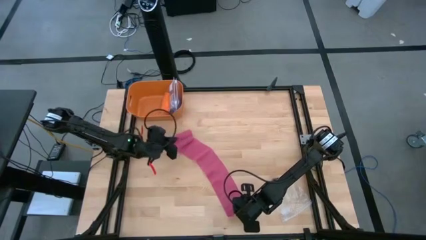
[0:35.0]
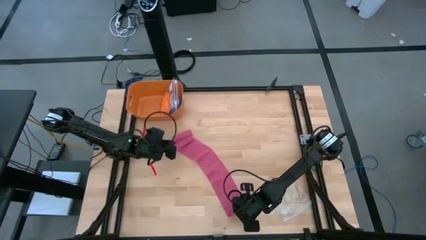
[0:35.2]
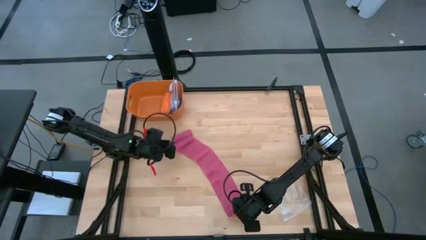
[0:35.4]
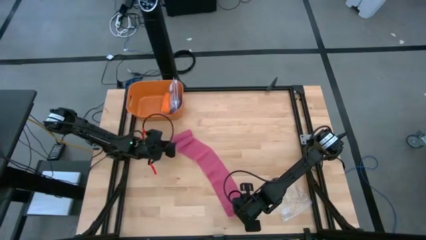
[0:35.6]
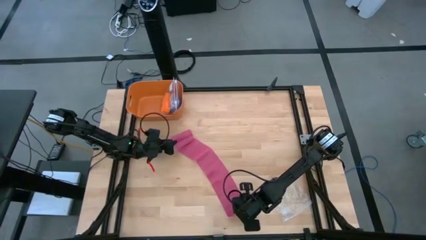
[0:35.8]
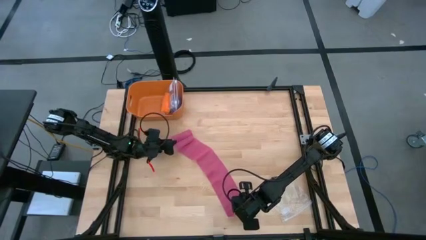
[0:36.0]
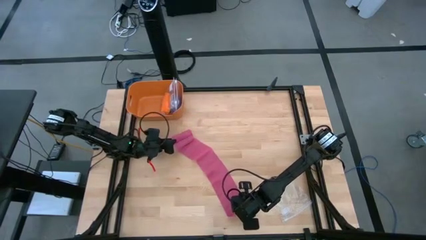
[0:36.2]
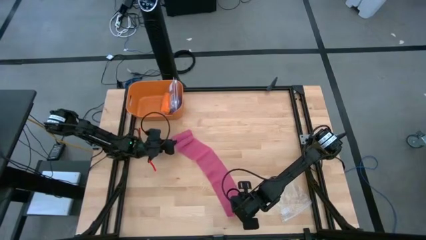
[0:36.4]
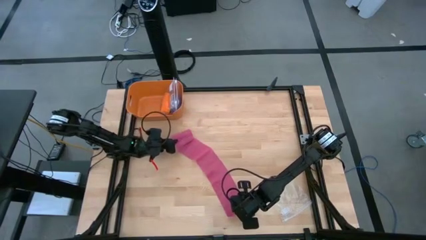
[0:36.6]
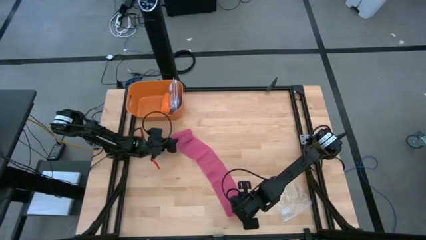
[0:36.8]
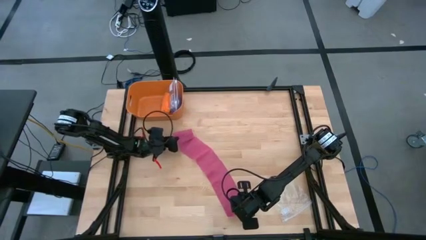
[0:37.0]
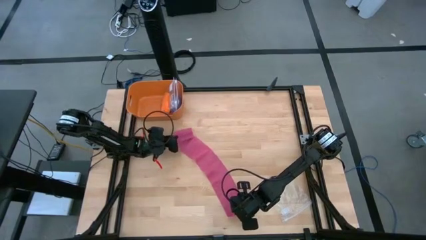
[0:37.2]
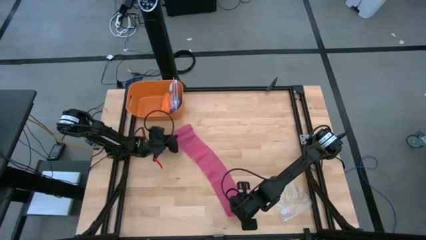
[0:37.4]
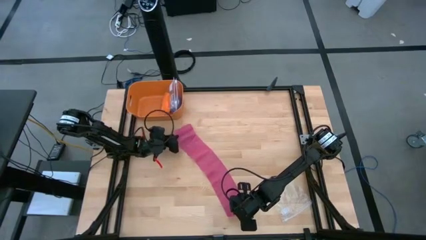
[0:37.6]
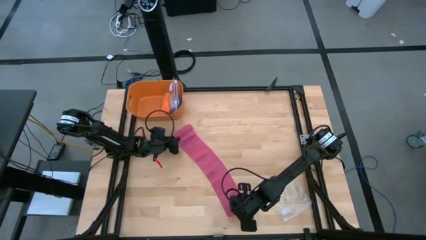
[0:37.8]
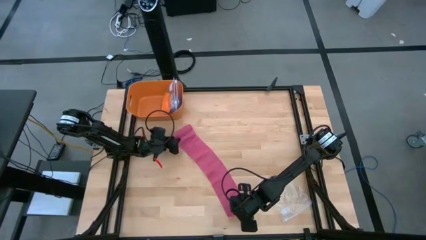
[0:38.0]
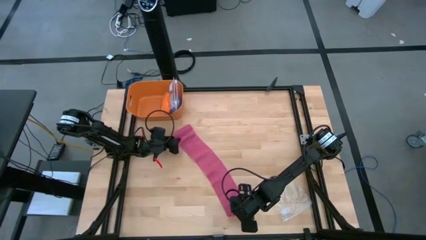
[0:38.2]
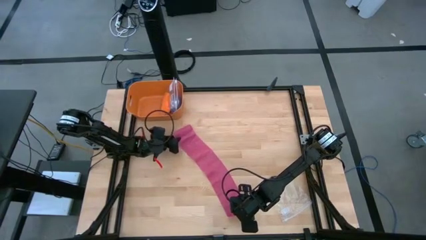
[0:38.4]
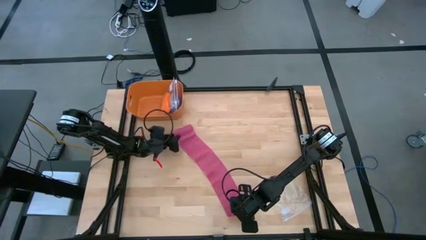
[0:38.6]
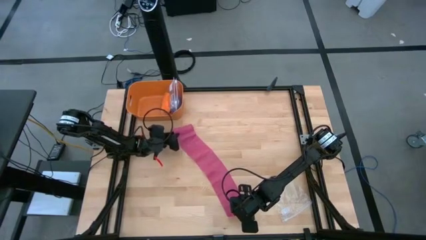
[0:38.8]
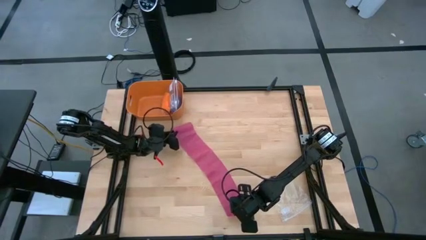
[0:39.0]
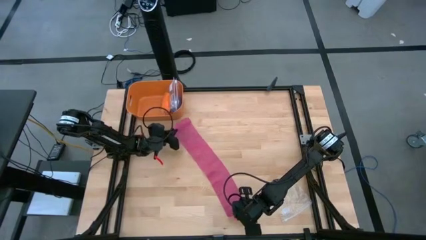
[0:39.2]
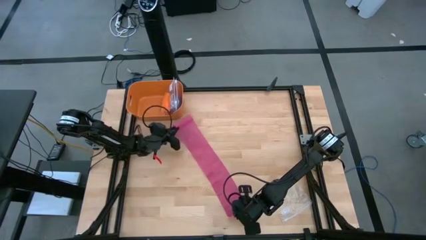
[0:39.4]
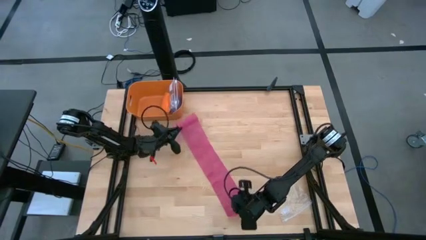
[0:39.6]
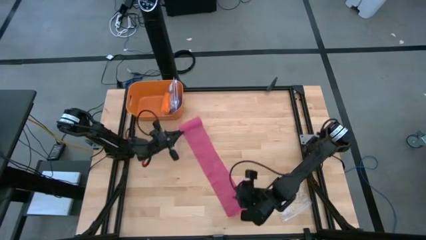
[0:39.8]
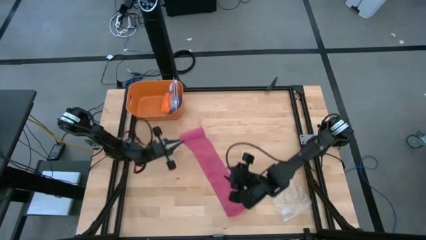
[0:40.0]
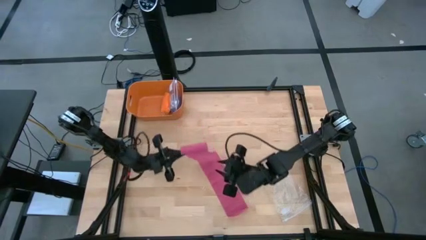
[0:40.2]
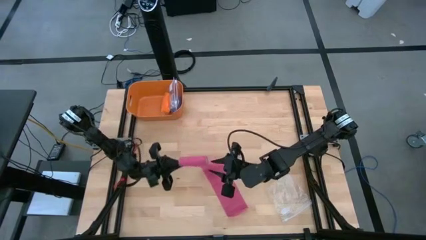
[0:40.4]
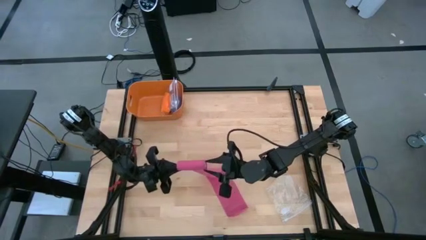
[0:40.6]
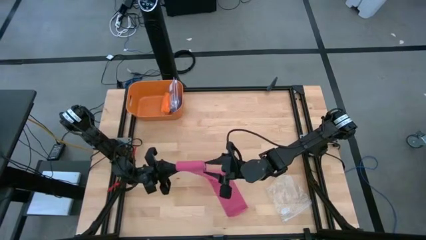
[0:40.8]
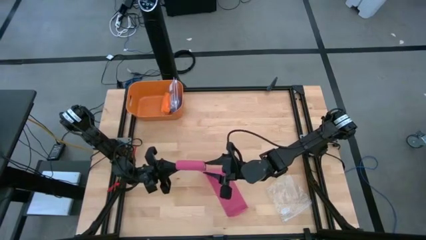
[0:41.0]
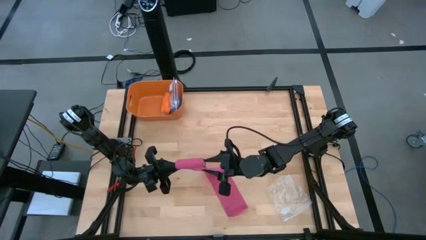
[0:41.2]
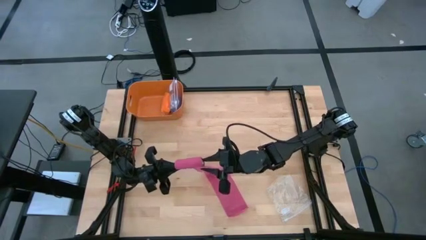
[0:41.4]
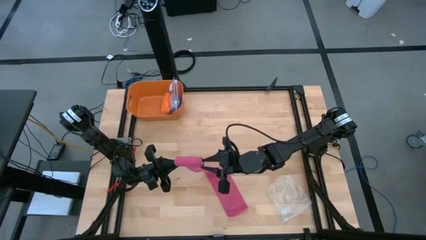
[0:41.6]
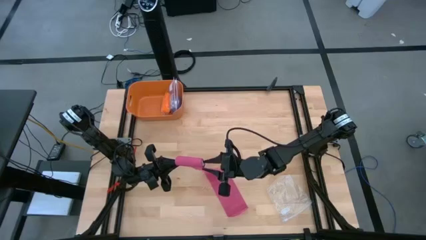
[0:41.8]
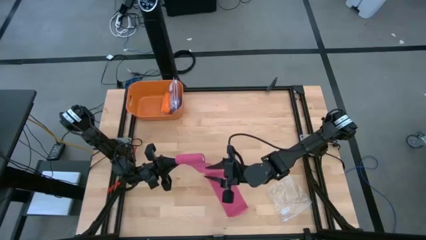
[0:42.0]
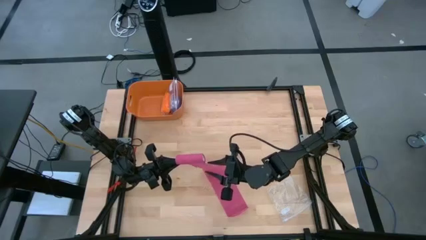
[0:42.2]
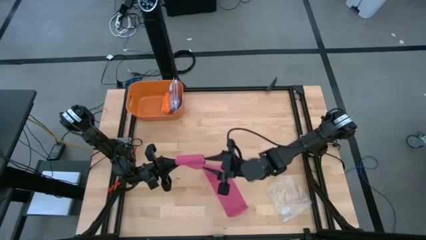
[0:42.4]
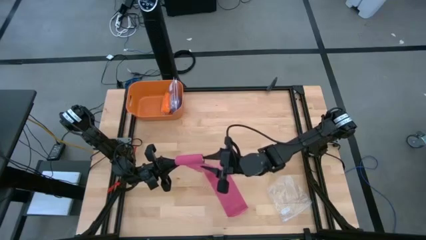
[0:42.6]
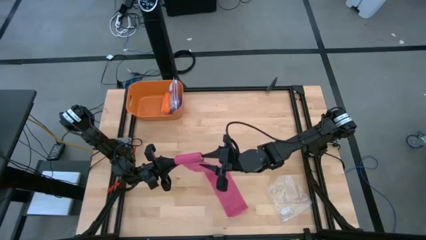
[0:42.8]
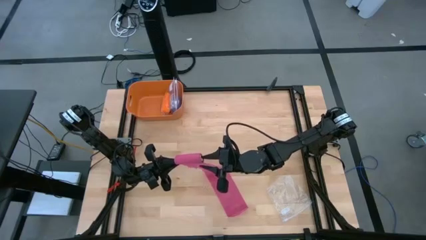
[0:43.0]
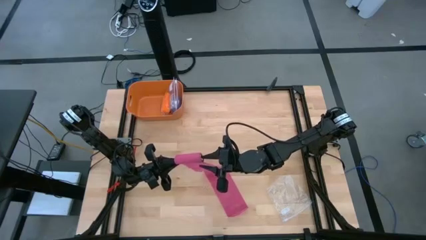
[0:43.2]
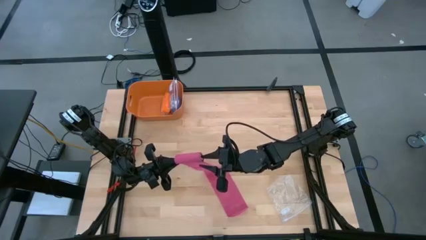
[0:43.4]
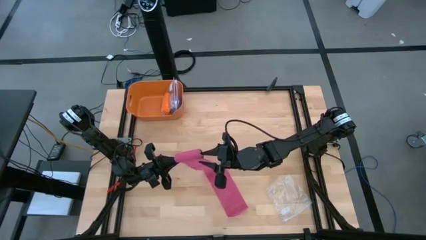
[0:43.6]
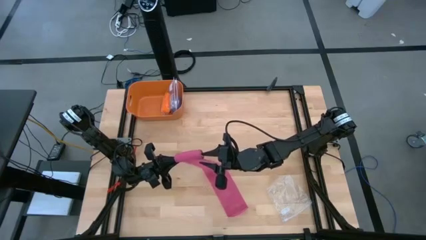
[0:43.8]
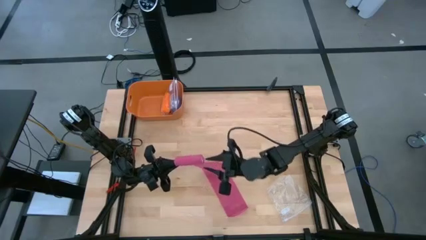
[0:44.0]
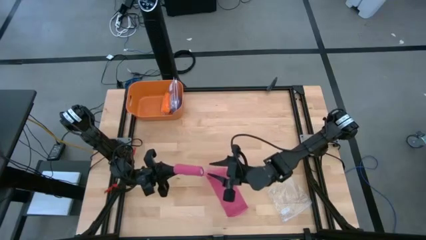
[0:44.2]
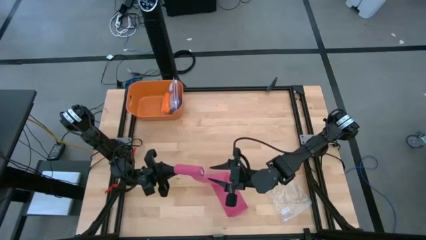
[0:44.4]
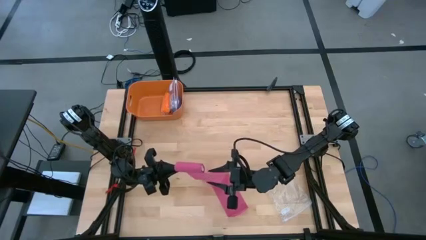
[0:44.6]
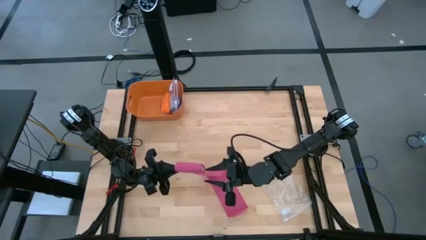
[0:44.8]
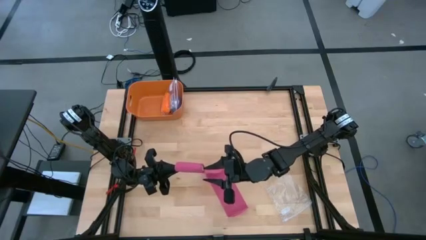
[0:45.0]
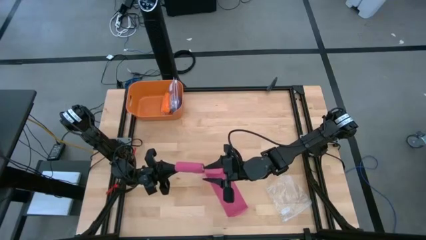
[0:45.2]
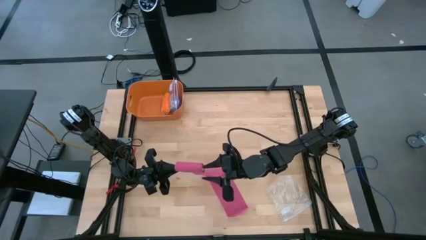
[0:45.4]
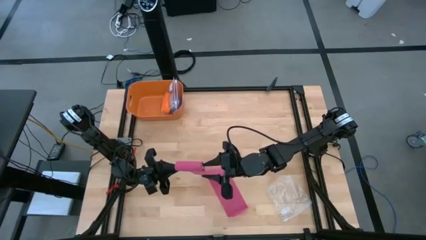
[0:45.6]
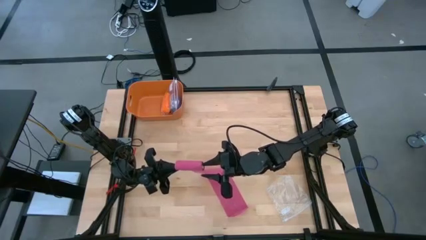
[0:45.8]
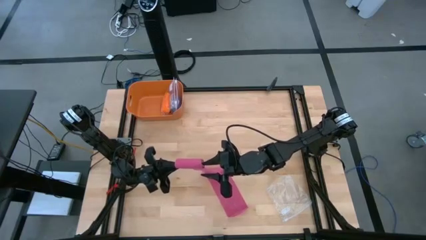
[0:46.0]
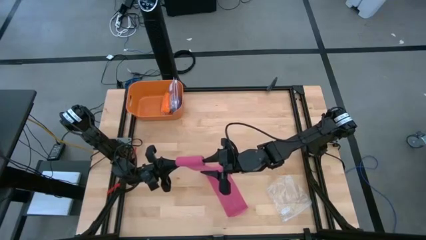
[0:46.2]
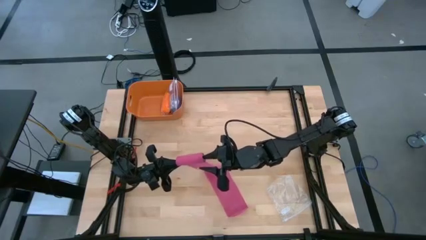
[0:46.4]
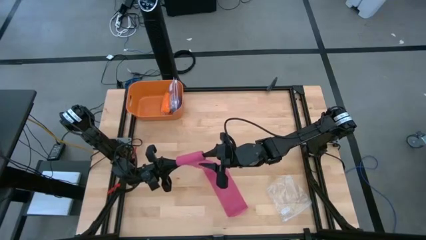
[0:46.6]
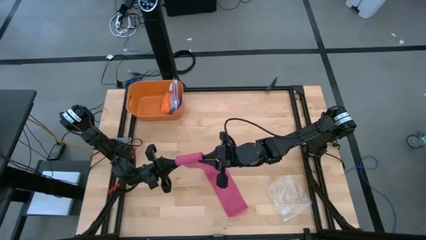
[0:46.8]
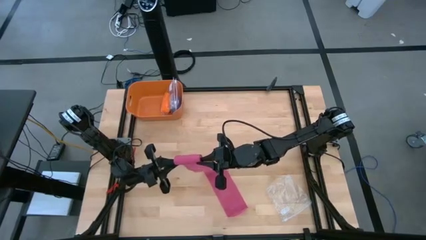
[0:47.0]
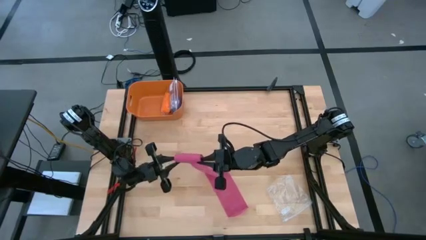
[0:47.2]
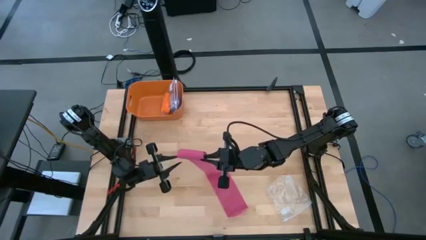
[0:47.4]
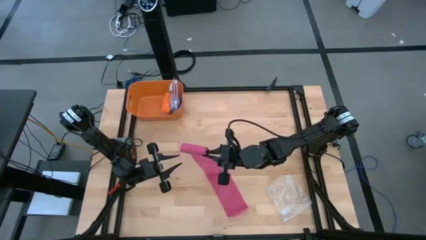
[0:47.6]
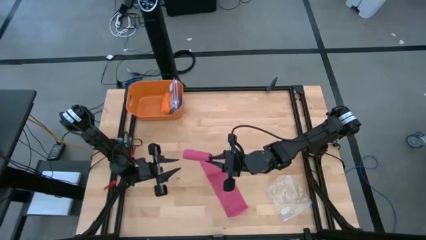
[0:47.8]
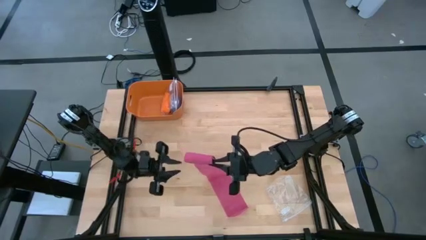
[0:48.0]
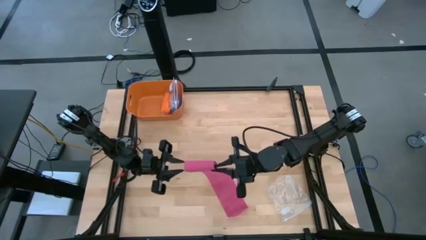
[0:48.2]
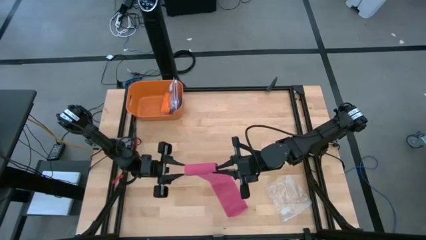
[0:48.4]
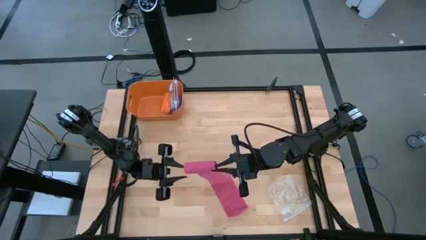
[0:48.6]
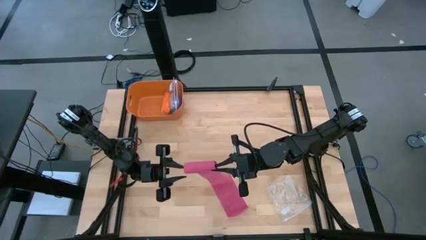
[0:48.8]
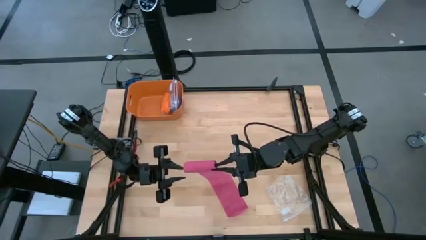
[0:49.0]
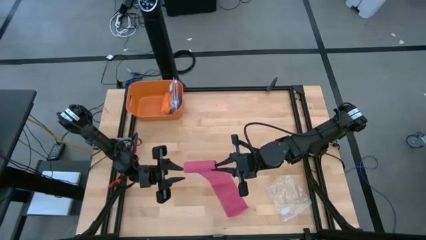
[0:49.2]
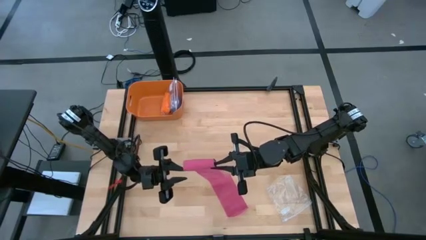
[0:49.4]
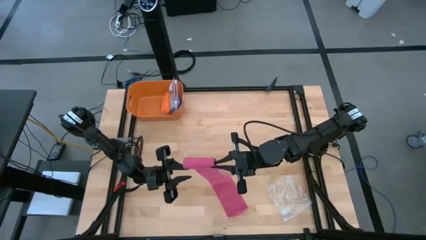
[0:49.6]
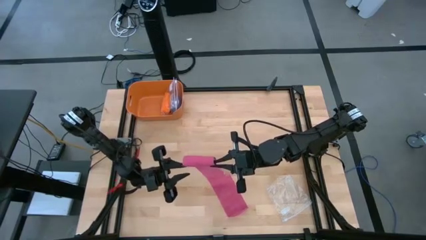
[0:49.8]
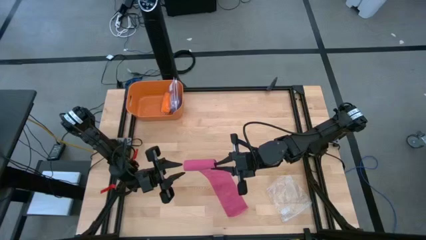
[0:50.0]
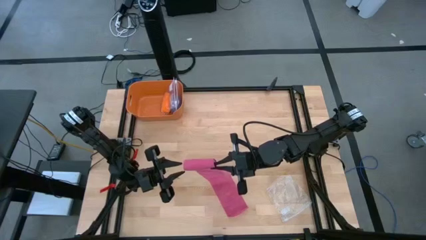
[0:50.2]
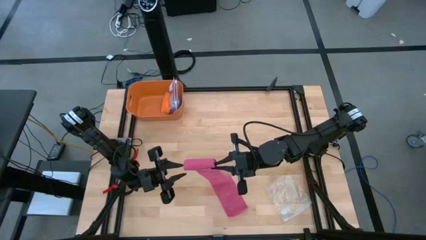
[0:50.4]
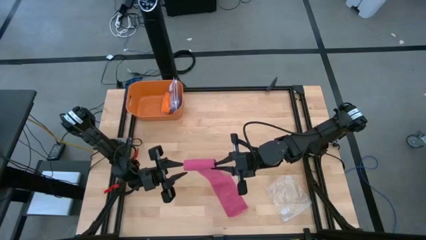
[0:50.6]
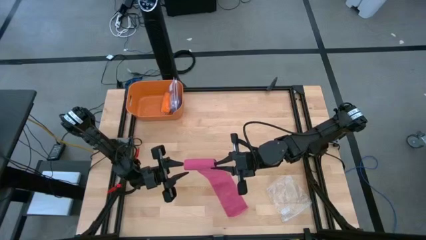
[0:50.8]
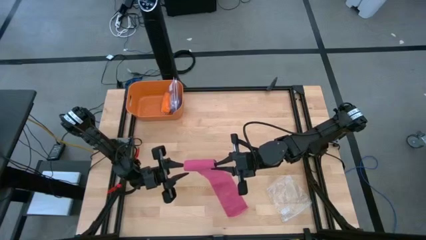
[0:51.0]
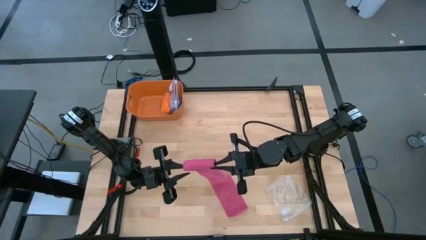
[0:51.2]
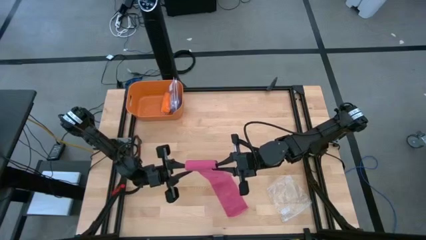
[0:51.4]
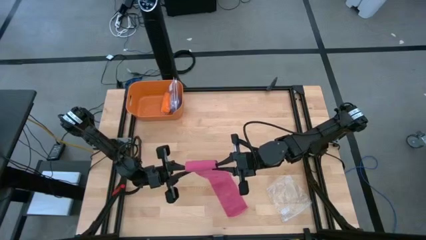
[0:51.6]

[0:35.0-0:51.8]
Task: Roll bandage
Roll the pink bandage
